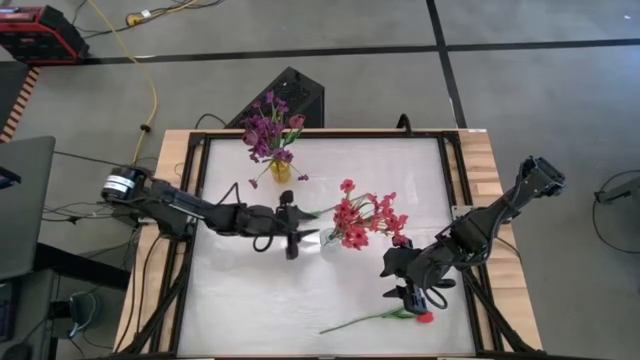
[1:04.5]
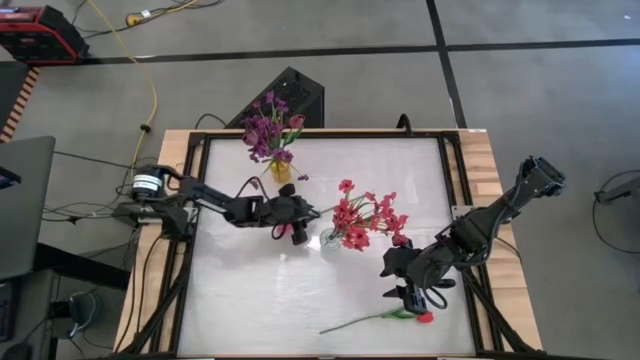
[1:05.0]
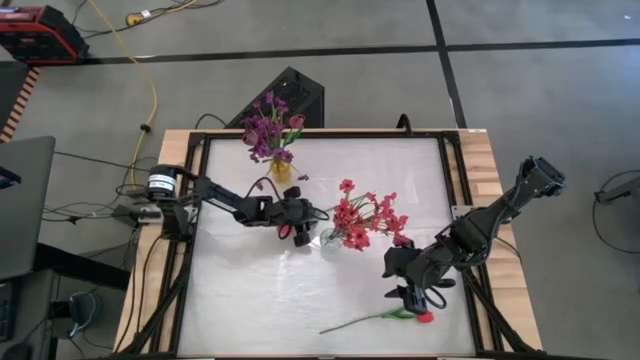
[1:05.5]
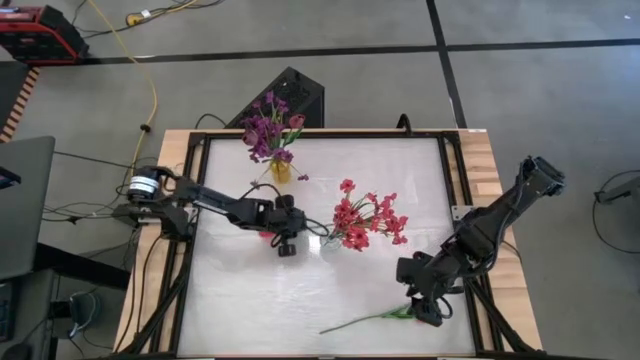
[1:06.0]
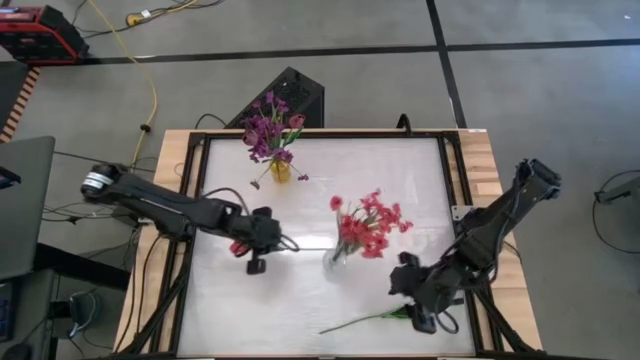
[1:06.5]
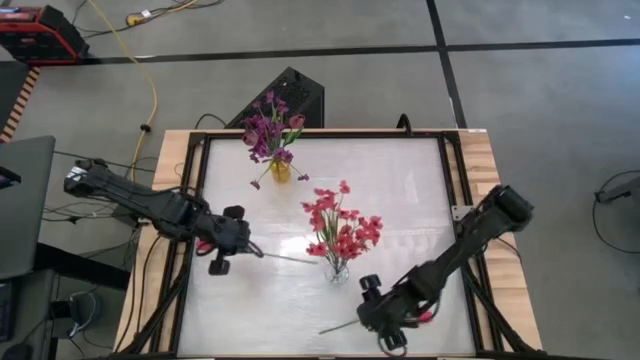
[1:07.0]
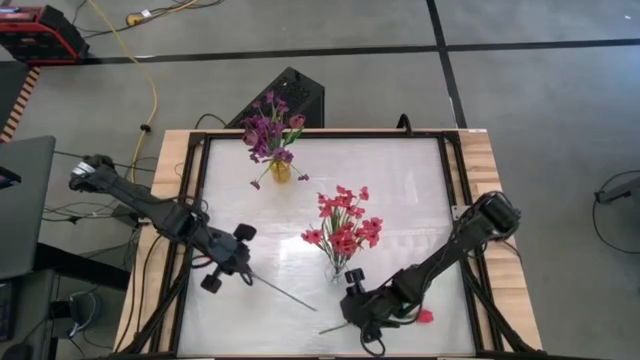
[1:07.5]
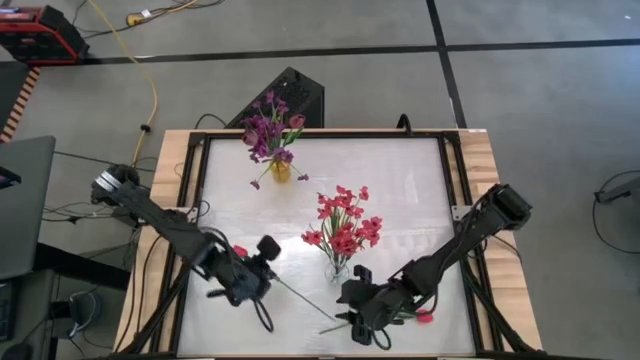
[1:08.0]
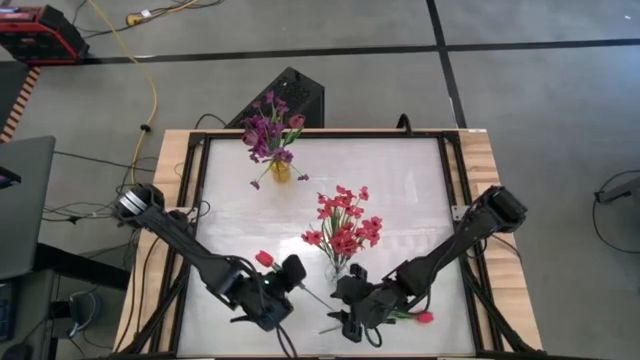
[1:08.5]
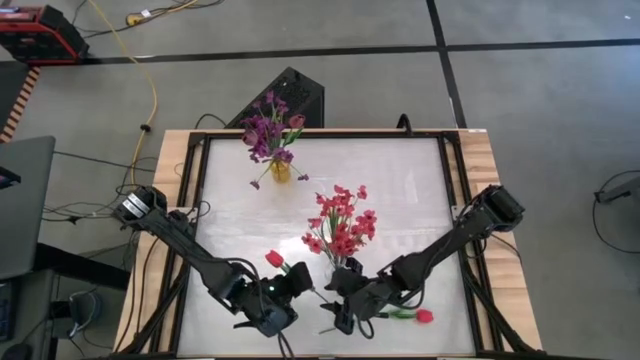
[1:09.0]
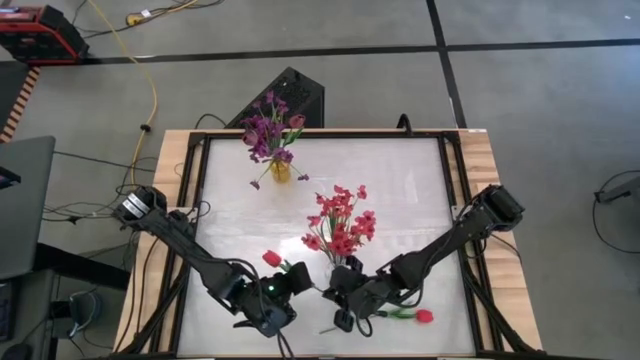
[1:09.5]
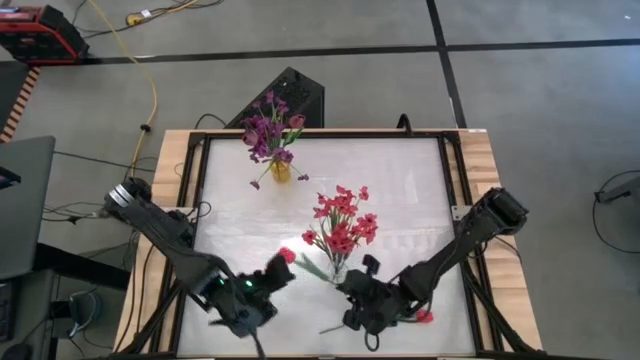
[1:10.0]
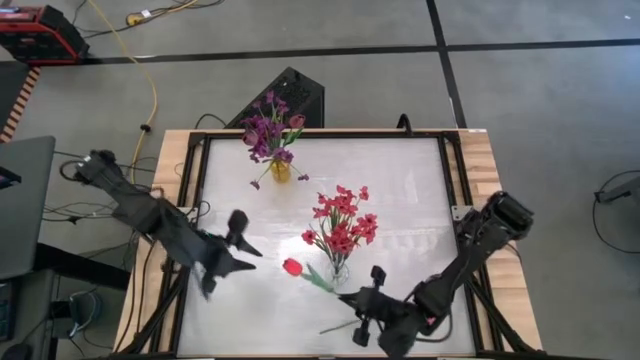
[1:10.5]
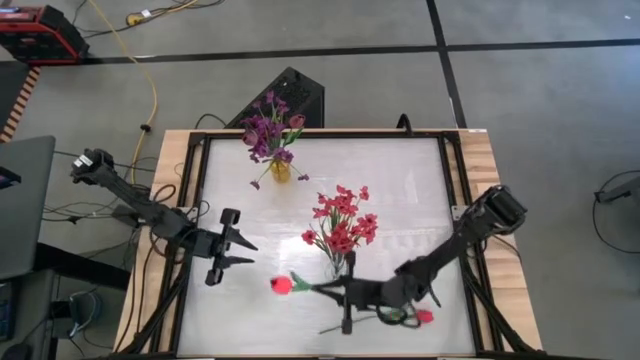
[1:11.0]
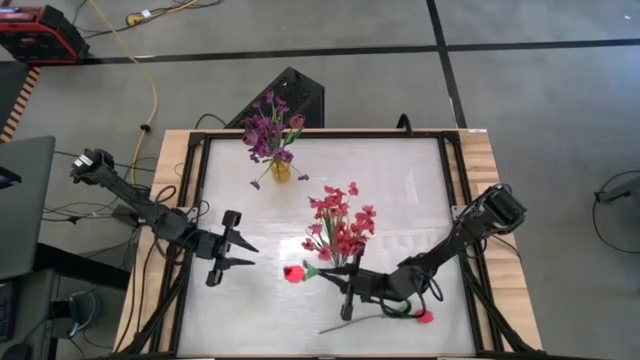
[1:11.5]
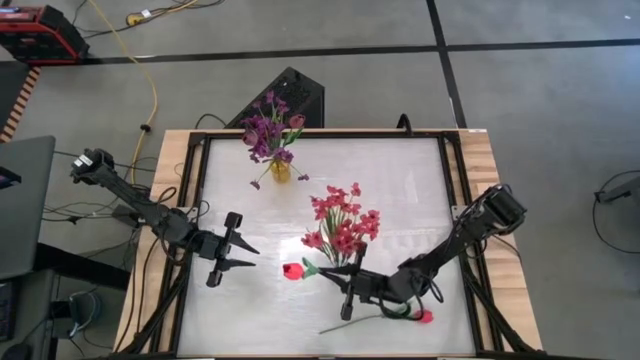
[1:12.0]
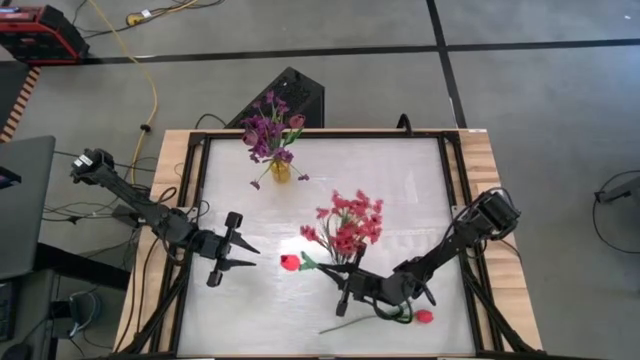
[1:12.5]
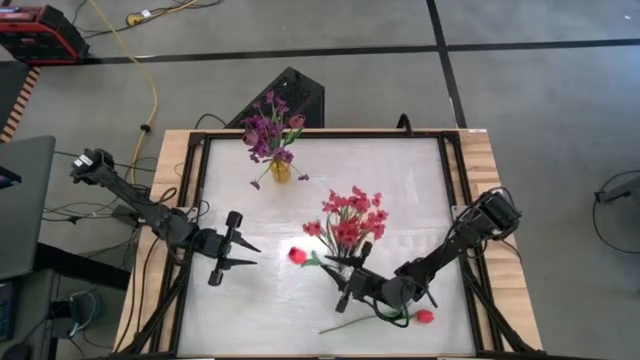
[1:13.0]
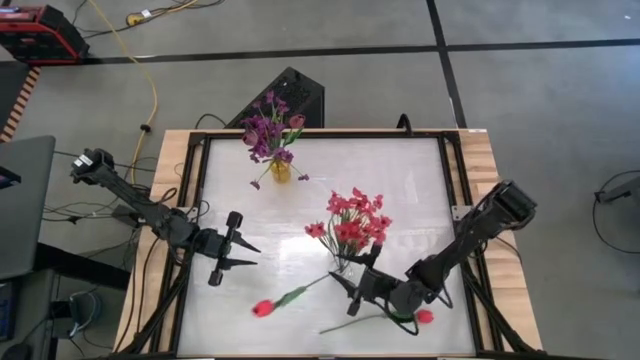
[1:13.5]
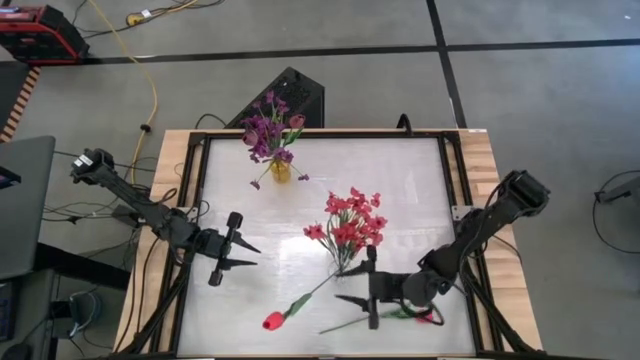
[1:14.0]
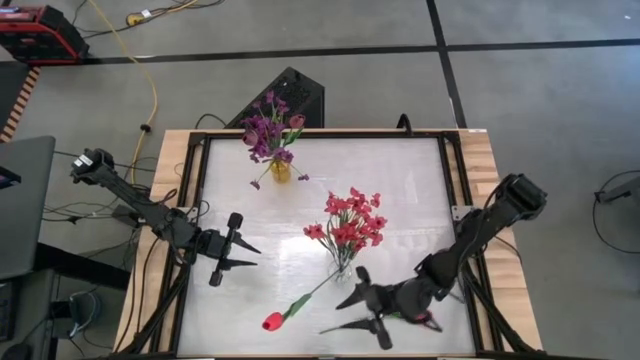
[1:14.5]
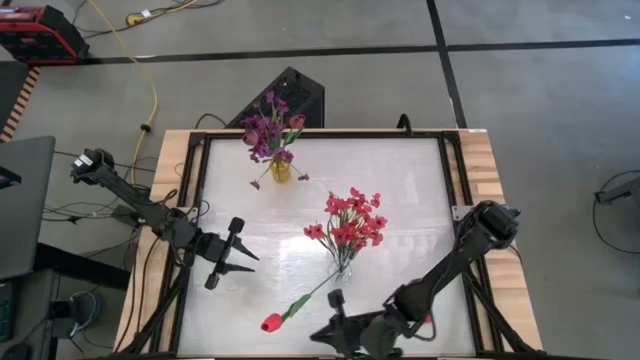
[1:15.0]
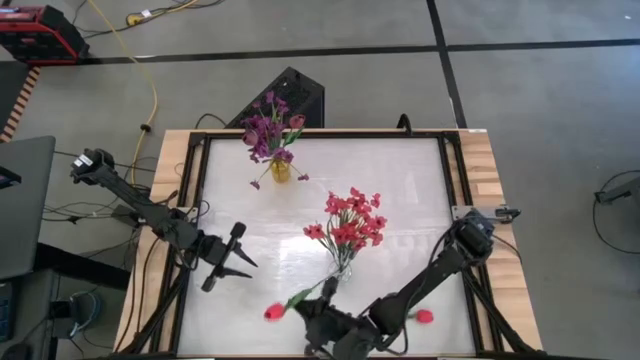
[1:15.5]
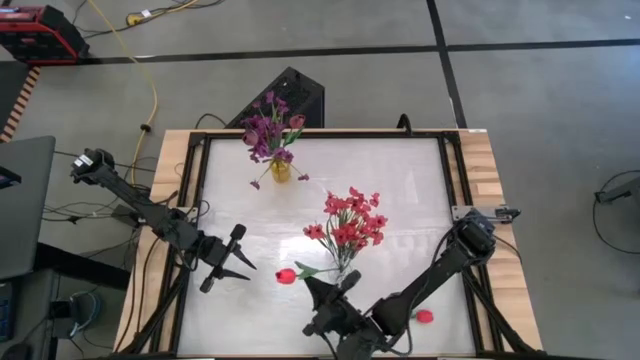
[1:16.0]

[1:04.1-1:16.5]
Task: Sort flowers into vase by color
Put the top red flower into the transparent vase

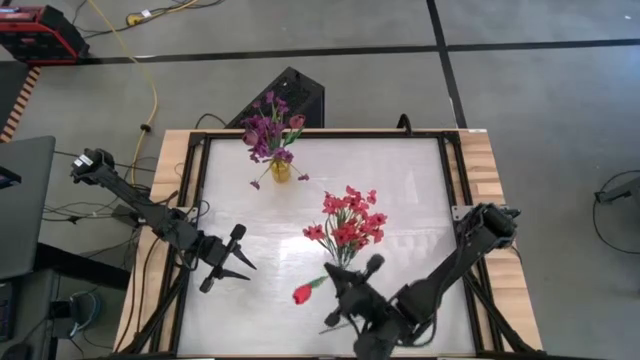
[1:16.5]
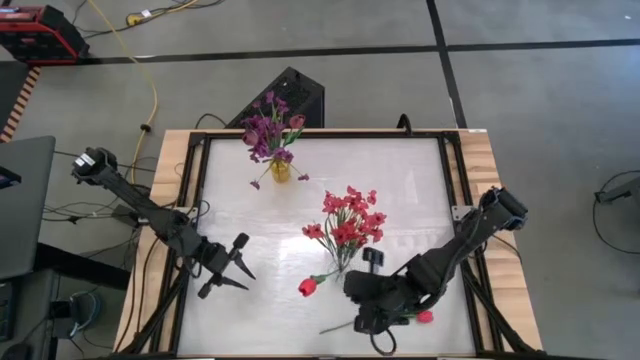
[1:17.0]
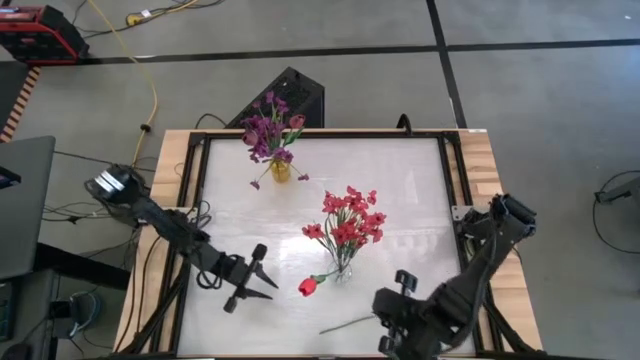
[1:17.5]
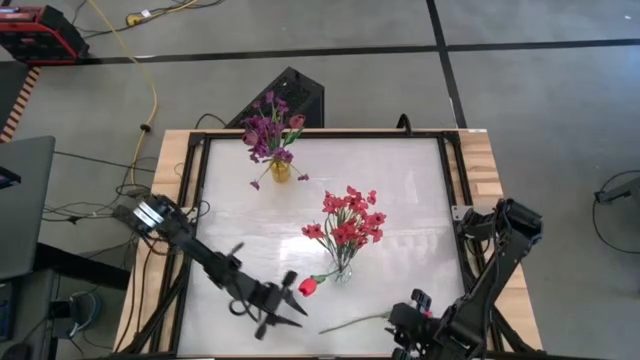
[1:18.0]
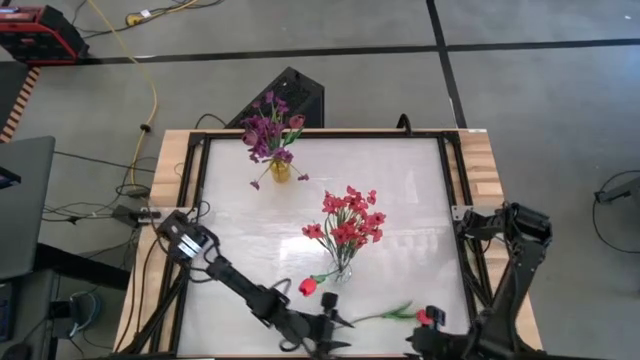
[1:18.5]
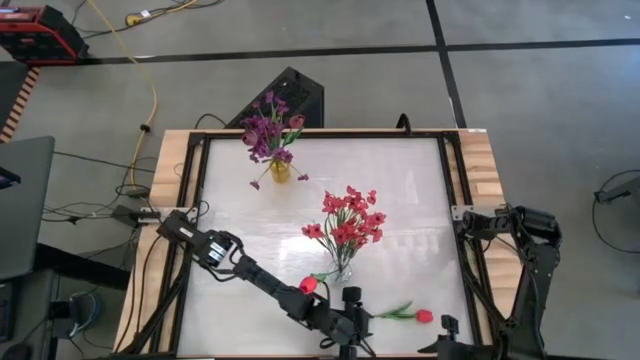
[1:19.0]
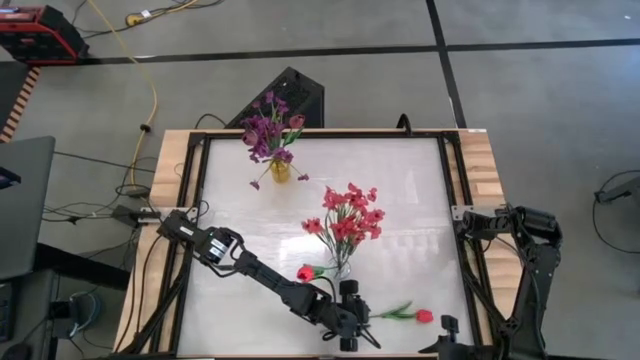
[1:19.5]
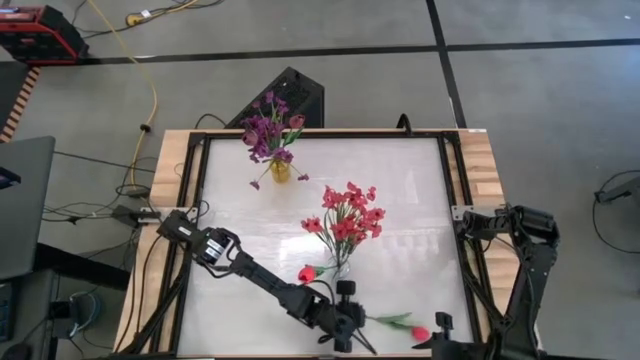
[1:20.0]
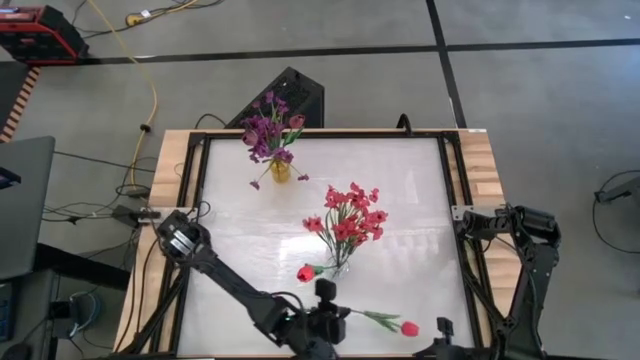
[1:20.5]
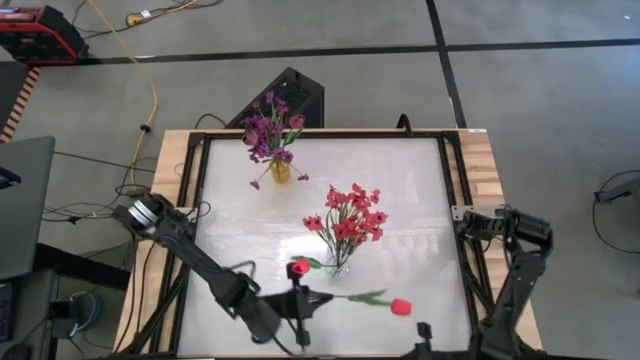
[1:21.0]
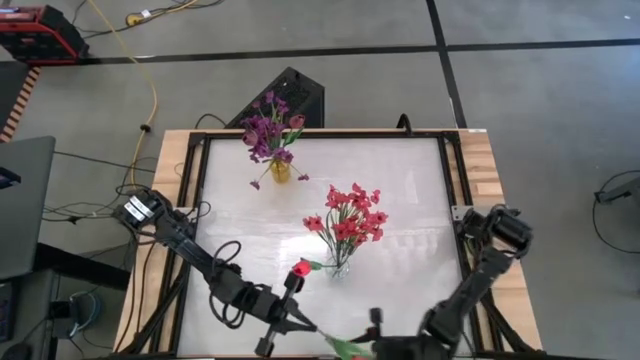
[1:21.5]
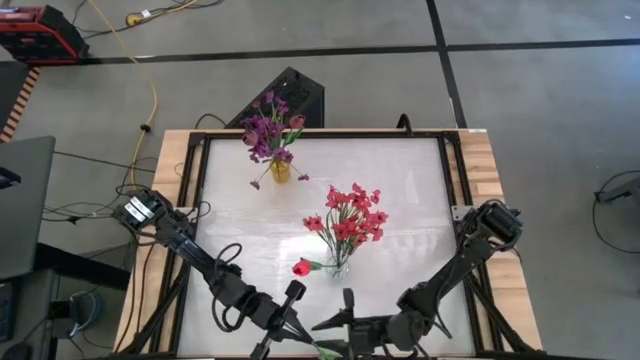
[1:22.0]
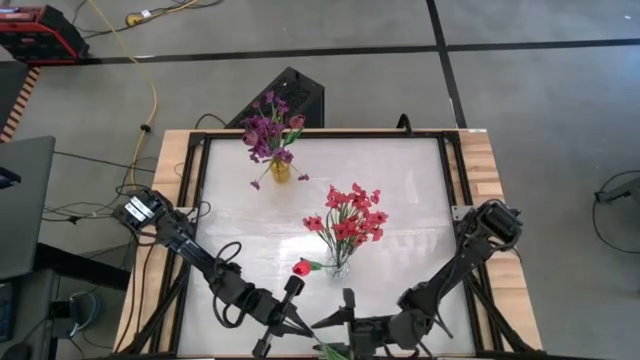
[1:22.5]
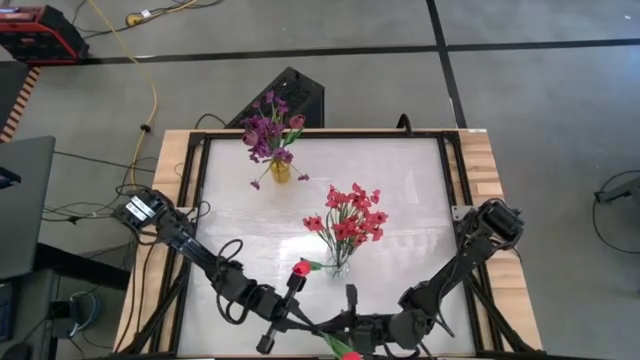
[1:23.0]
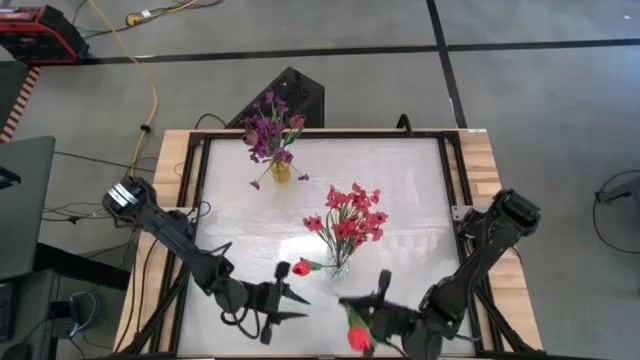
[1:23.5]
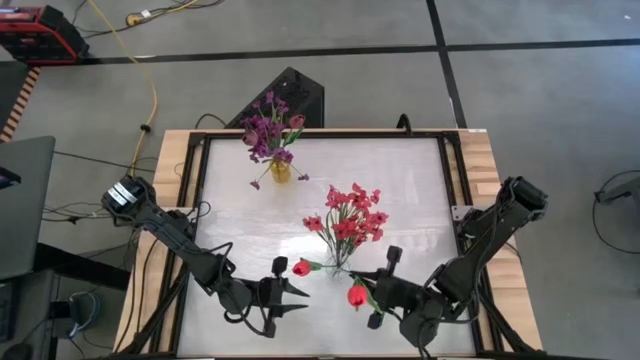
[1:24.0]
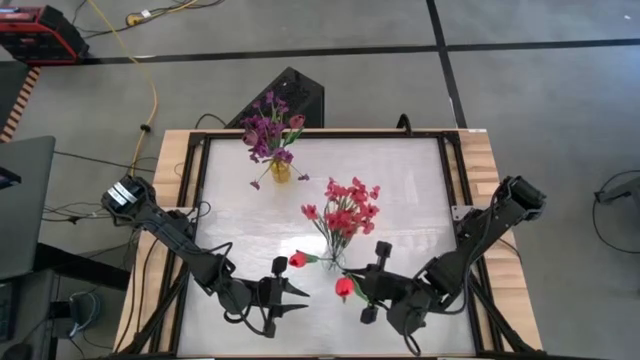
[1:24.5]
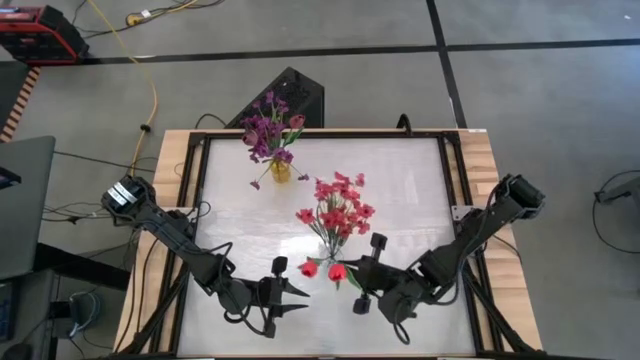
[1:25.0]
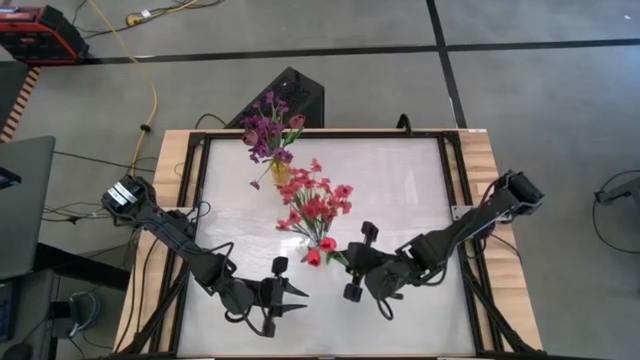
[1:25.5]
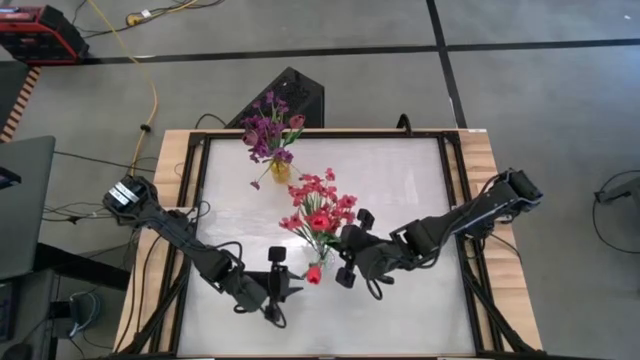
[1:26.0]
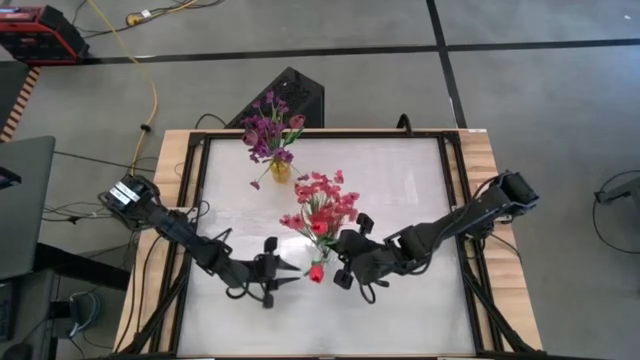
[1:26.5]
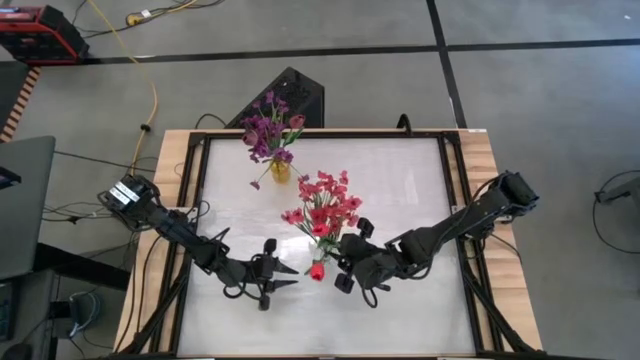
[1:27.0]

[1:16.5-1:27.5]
Put the red flower into the transparent vase
